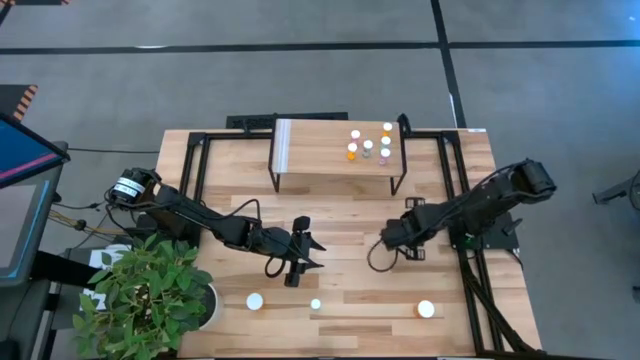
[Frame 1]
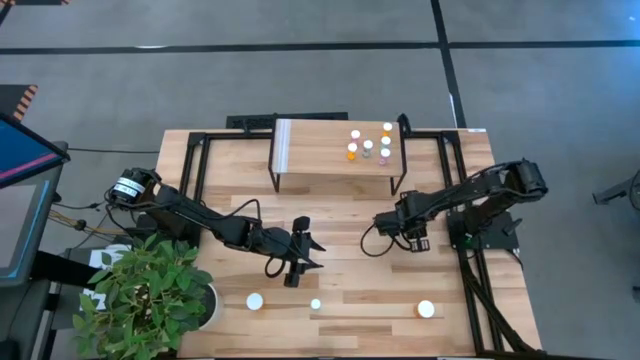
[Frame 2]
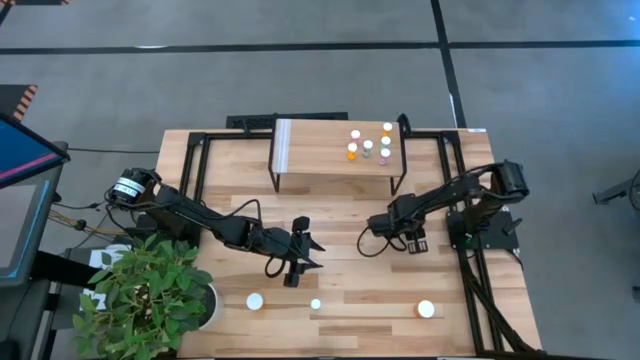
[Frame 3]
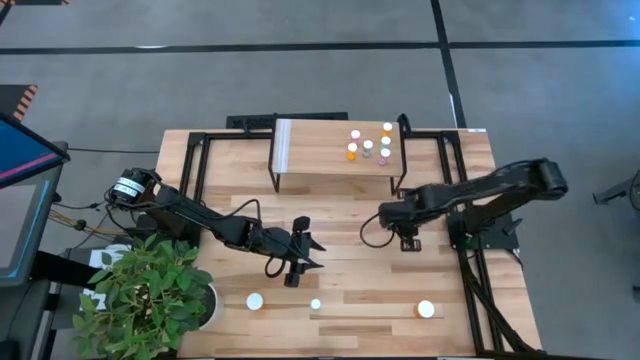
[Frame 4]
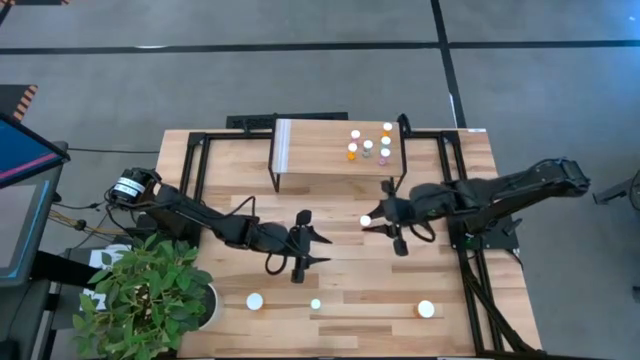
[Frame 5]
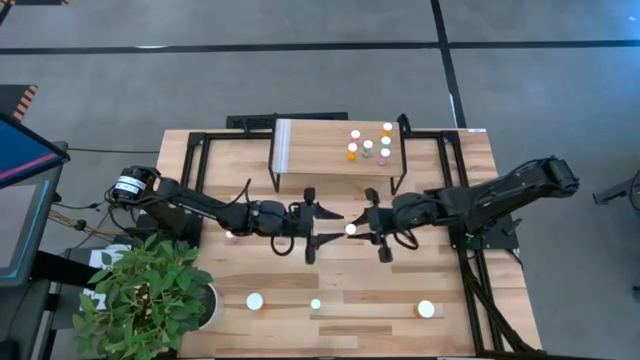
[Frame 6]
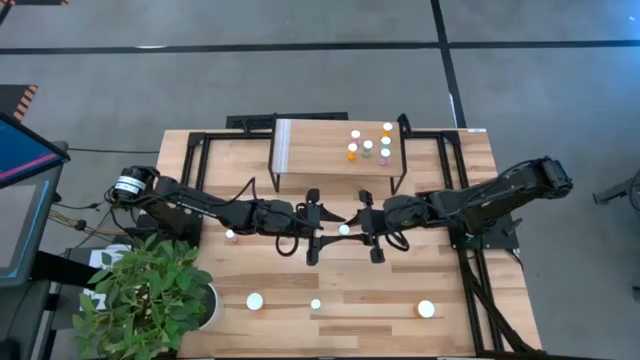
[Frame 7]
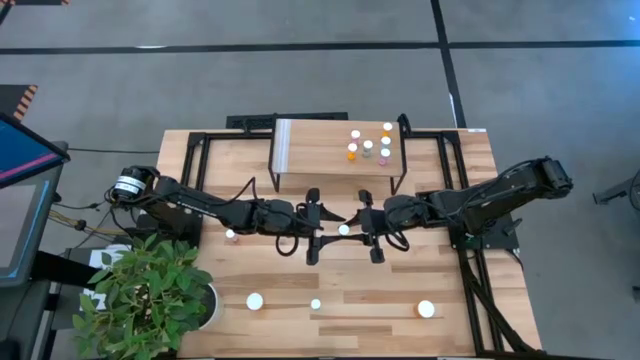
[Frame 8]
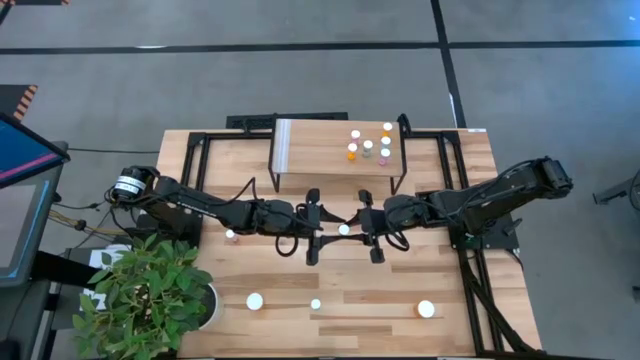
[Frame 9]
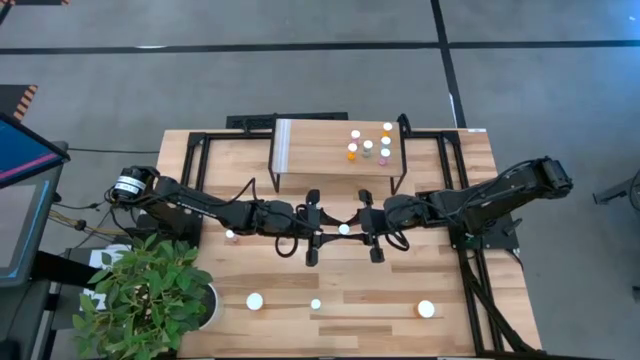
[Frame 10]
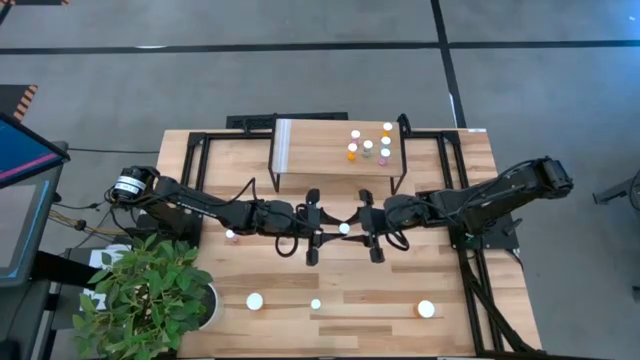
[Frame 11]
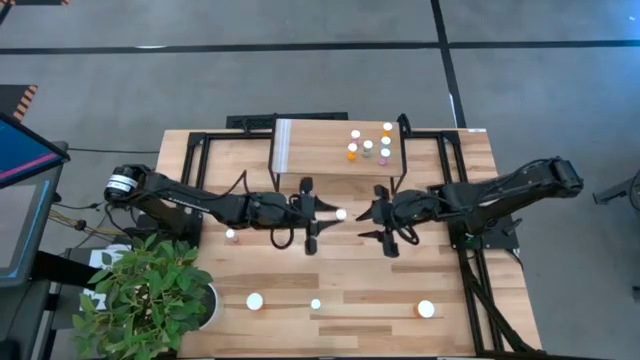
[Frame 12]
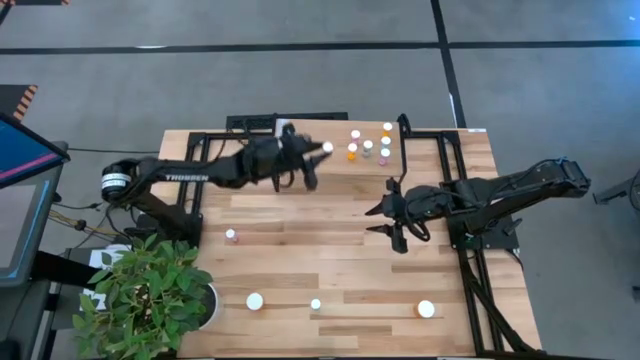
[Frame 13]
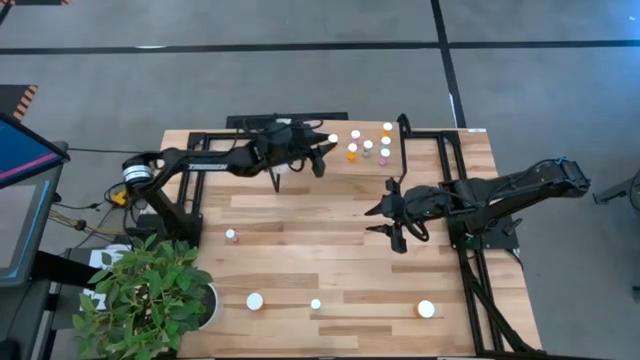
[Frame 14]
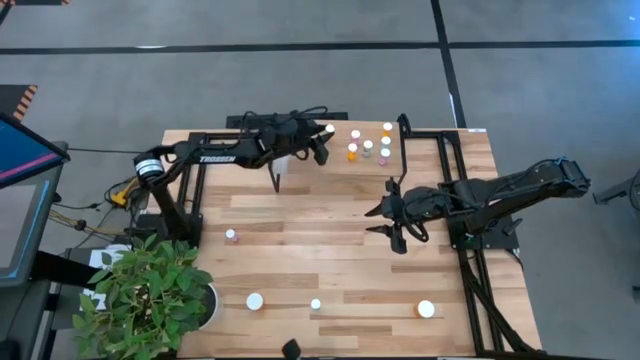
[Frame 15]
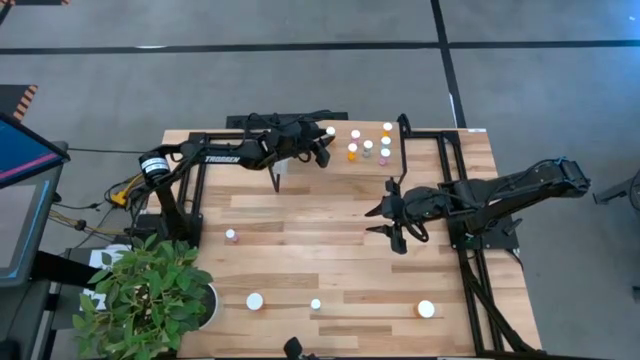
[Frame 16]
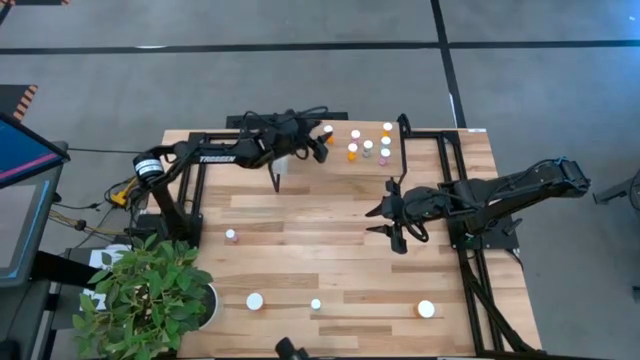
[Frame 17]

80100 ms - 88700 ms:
Task: Pick and place medicine bottles onto shelf by color
Put the small orange pill bottle on the shelf

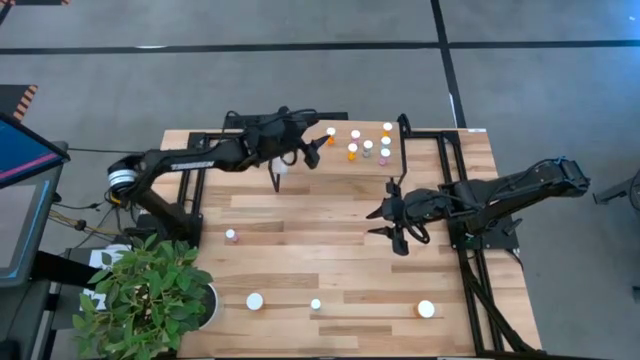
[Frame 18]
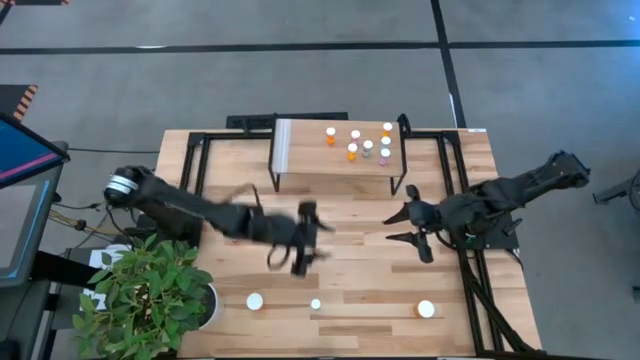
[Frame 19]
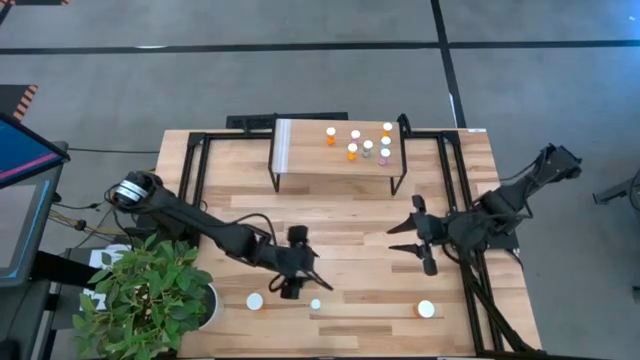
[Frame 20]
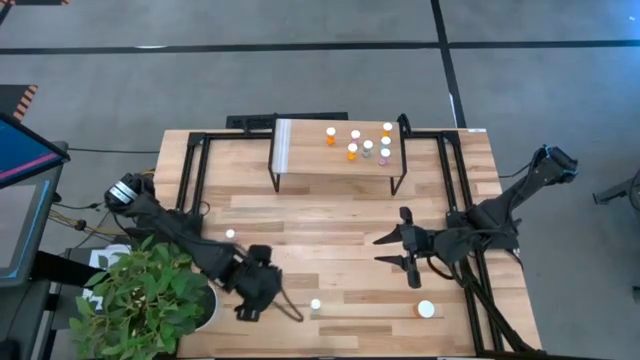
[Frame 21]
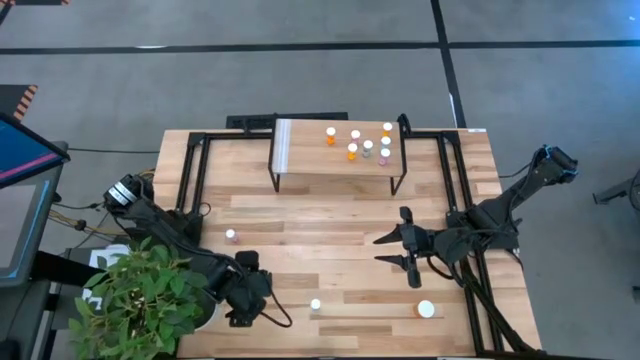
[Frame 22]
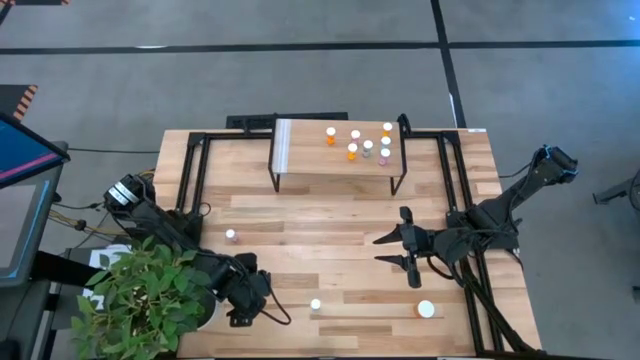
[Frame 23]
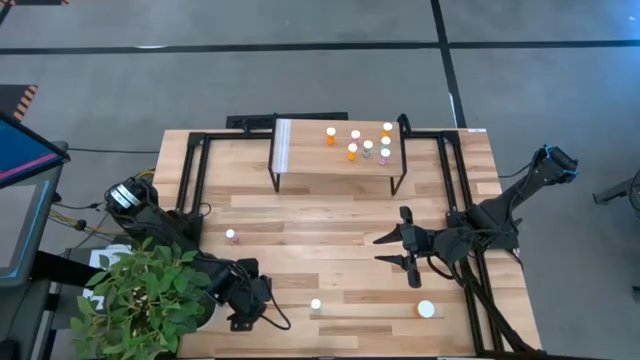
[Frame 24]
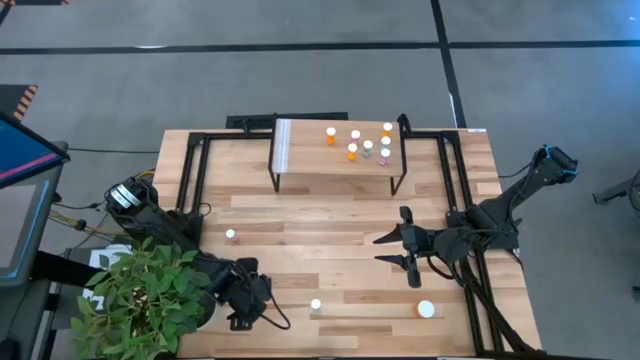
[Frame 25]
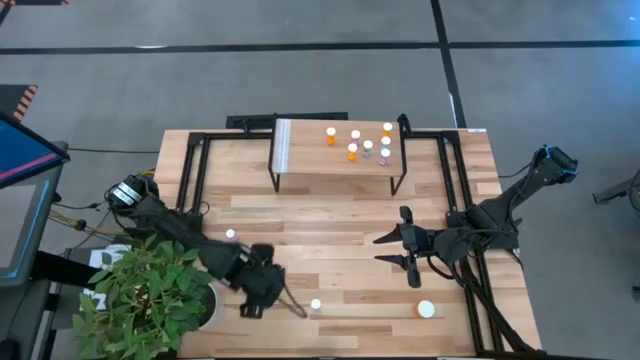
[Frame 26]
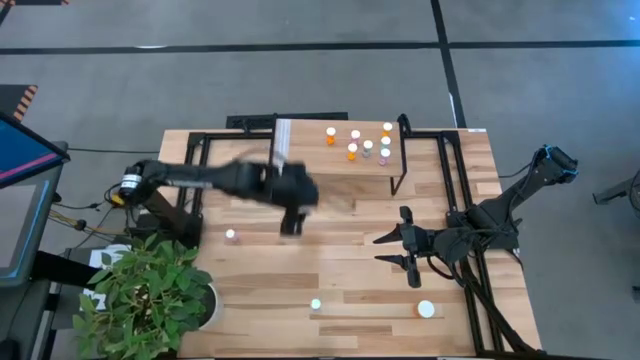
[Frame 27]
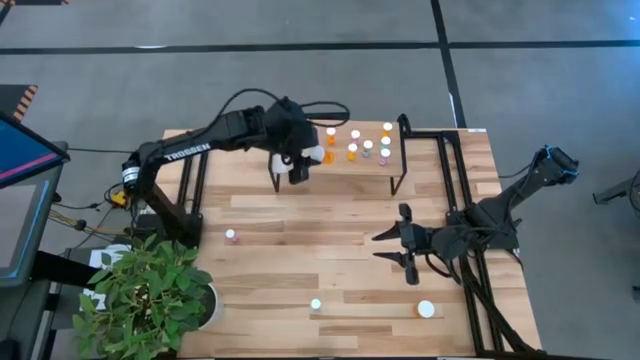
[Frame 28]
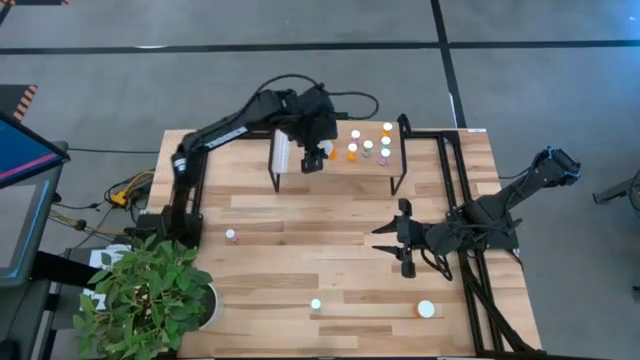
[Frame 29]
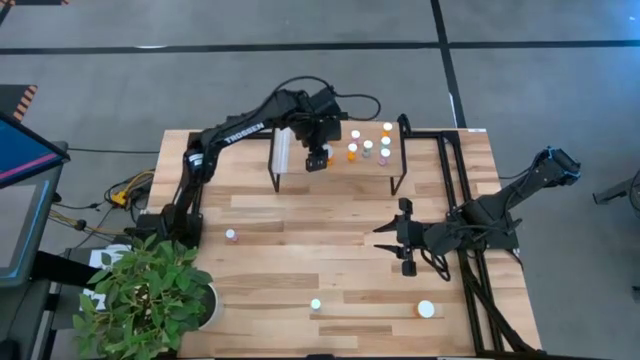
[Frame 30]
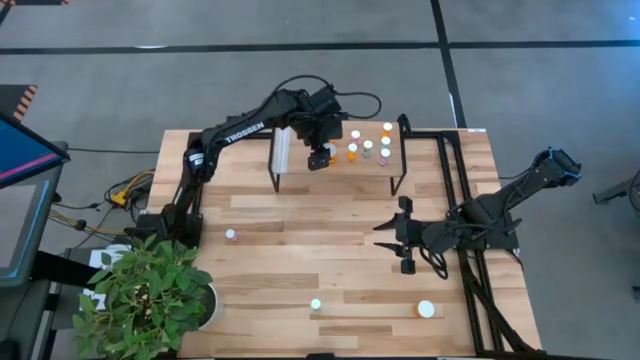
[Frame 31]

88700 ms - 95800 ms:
Put the left big orange pill bottle on the shelf

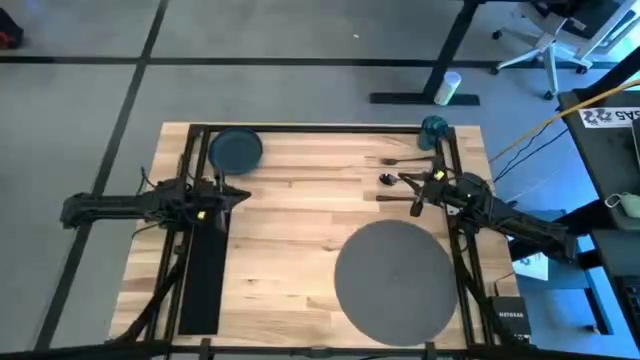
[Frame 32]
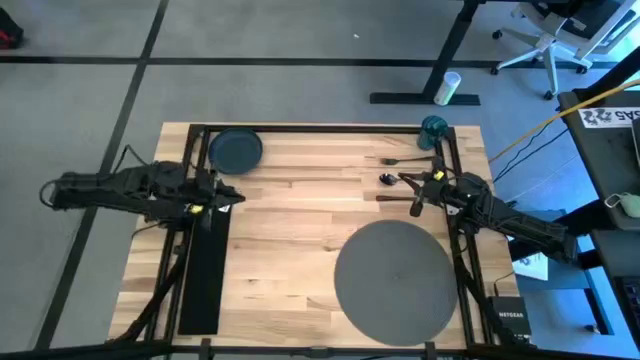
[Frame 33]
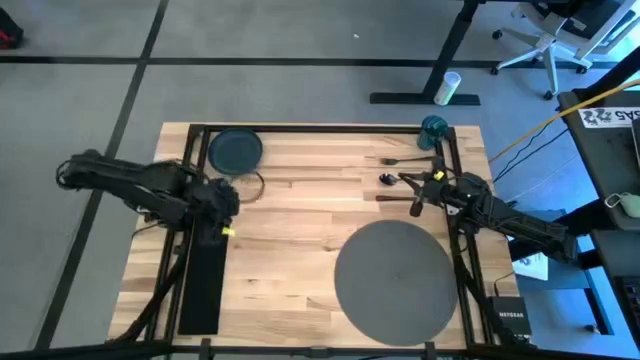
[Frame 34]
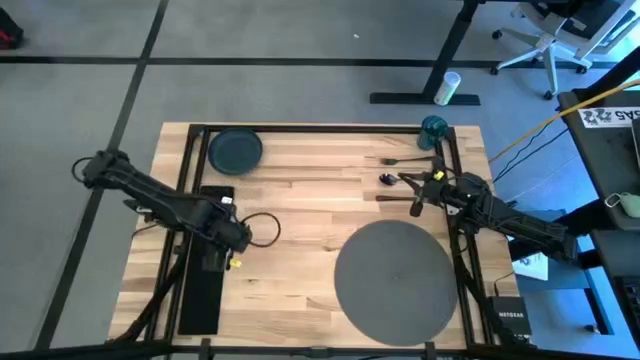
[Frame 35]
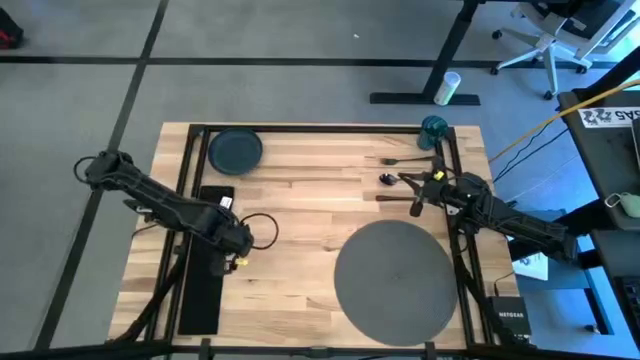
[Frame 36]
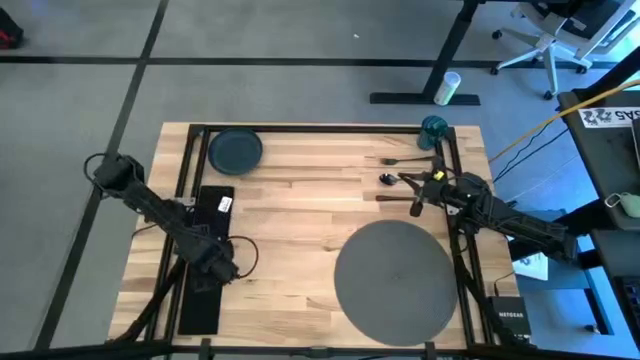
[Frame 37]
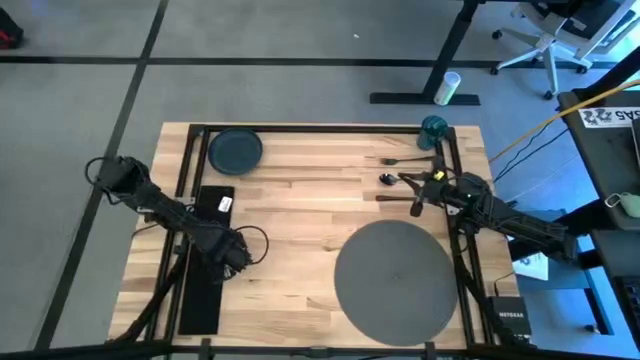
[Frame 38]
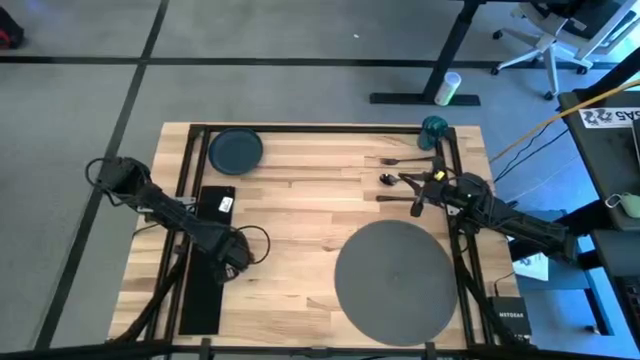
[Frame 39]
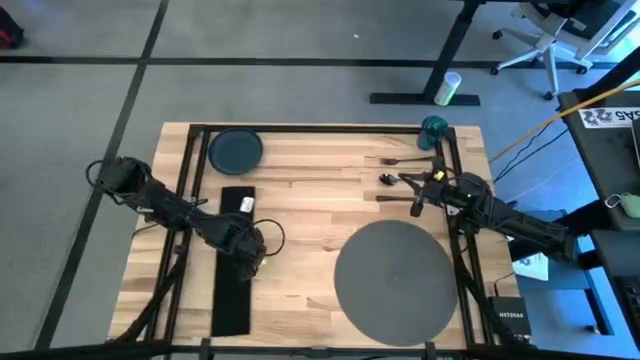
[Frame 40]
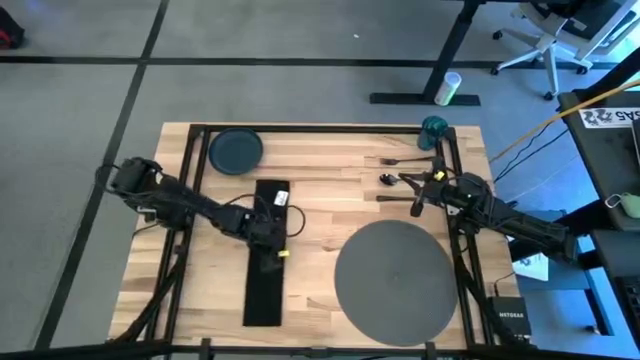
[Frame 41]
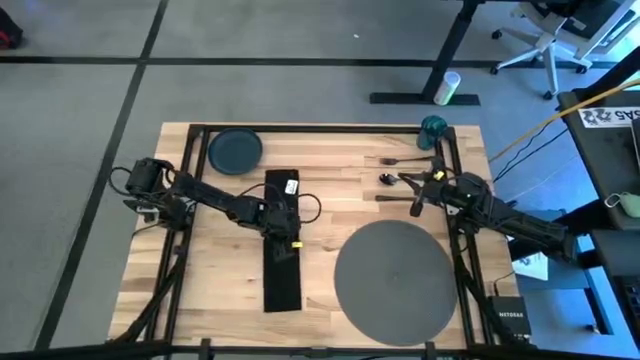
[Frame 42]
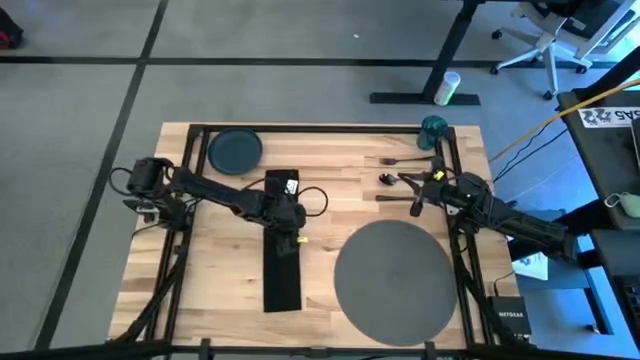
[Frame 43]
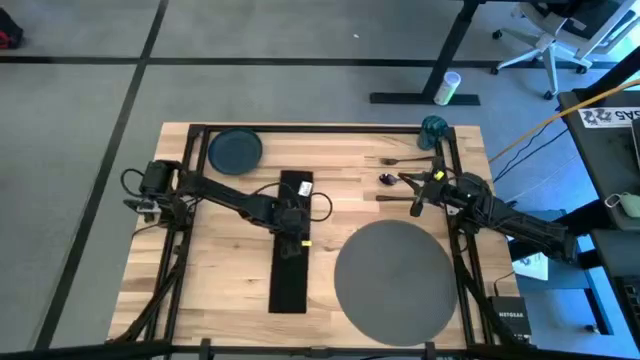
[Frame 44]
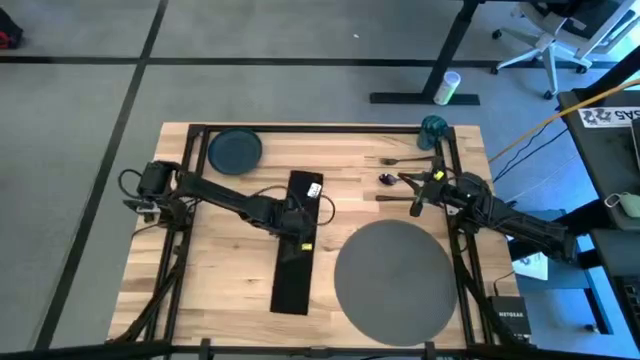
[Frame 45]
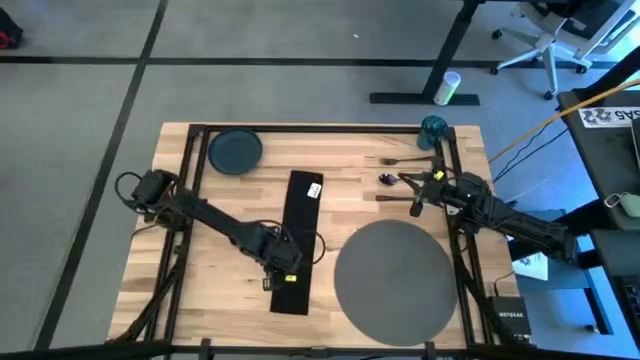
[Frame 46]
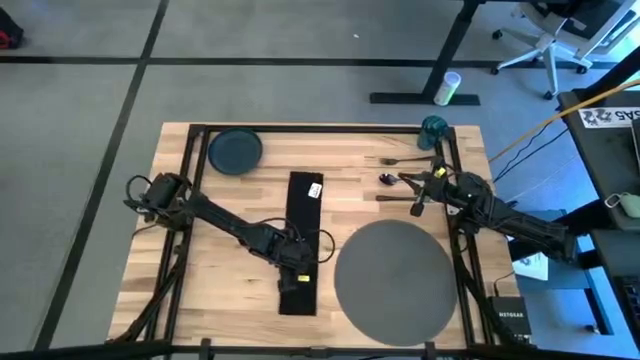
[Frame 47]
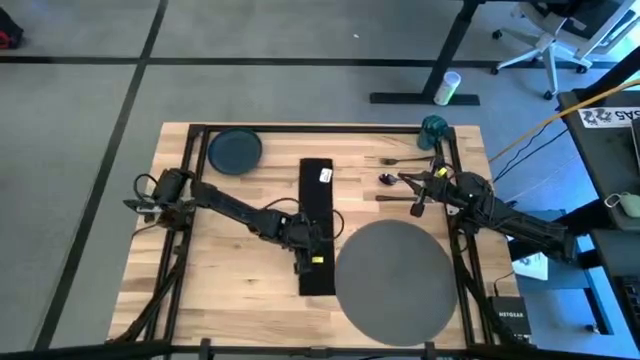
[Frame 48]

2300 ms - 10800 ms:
Task: Set table place
Move the black table napkin to the center of the table
